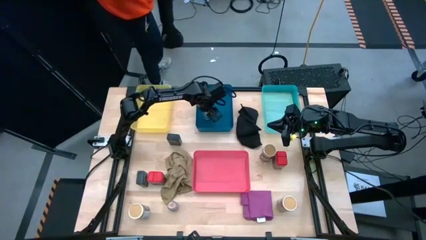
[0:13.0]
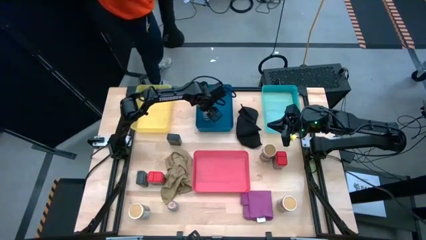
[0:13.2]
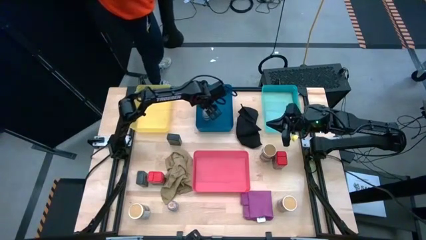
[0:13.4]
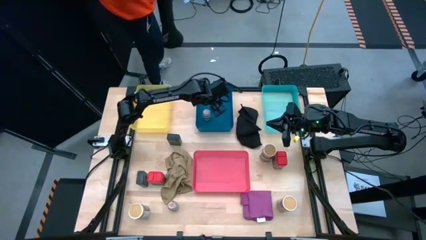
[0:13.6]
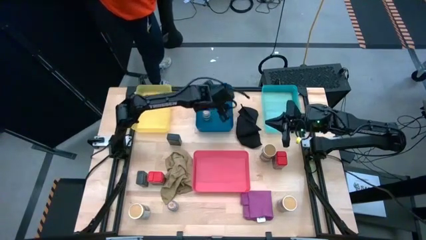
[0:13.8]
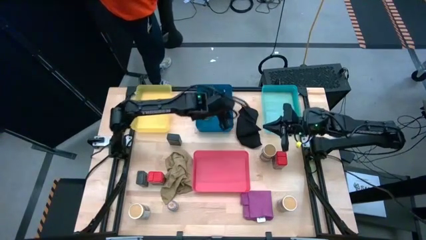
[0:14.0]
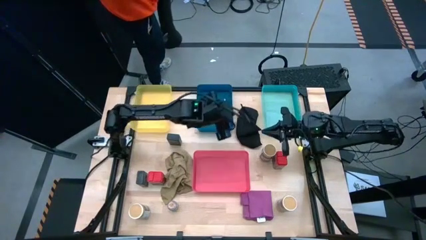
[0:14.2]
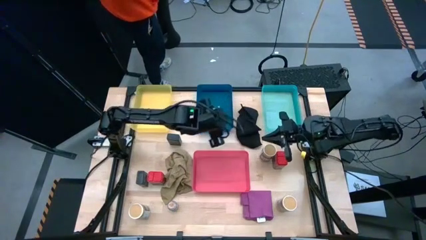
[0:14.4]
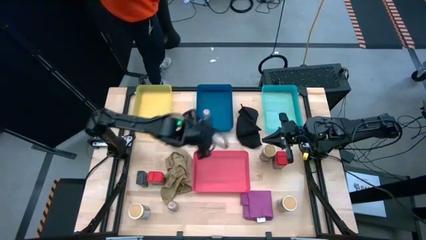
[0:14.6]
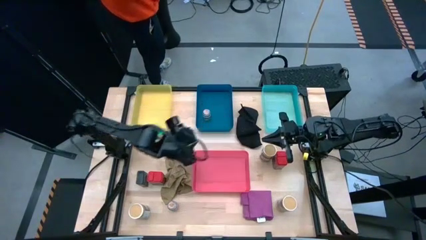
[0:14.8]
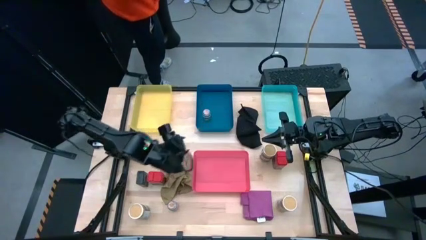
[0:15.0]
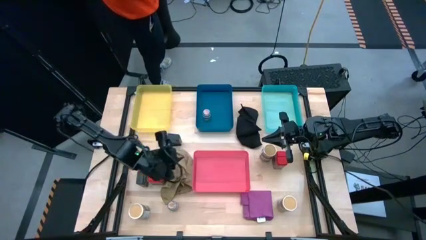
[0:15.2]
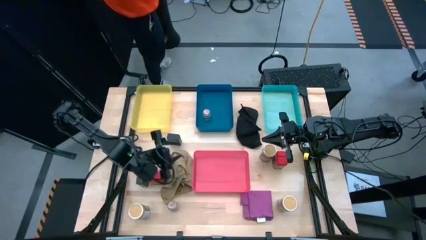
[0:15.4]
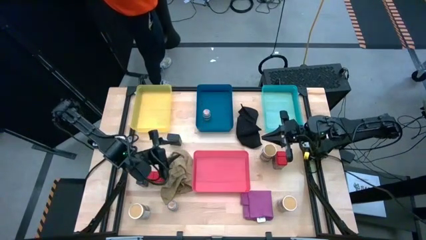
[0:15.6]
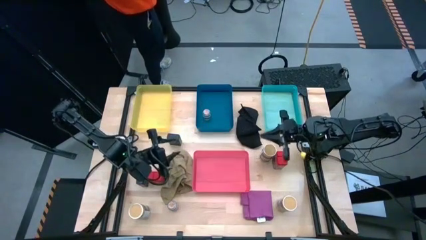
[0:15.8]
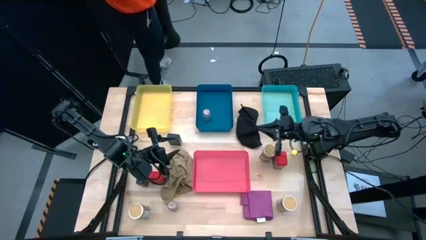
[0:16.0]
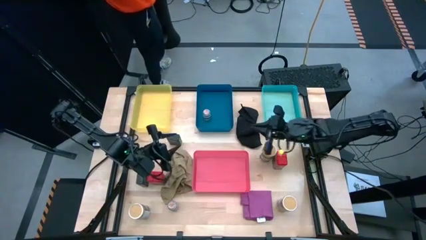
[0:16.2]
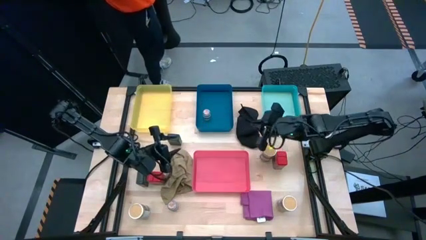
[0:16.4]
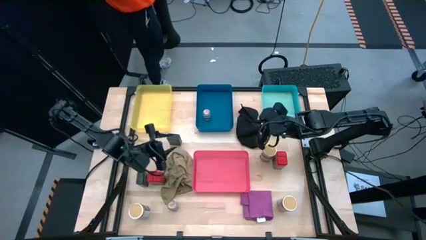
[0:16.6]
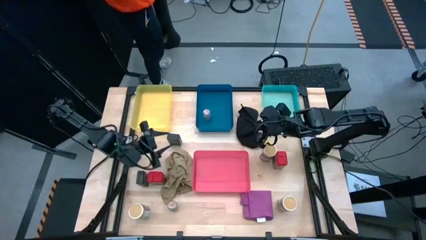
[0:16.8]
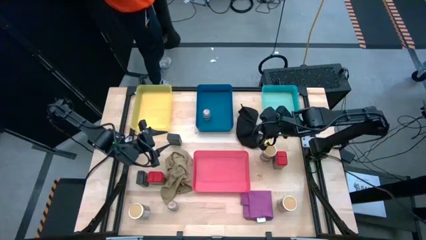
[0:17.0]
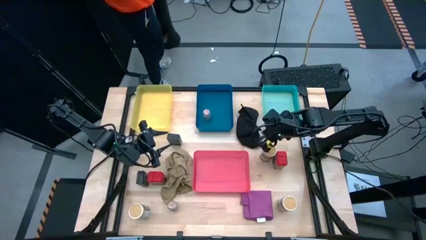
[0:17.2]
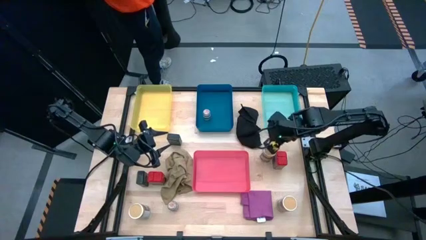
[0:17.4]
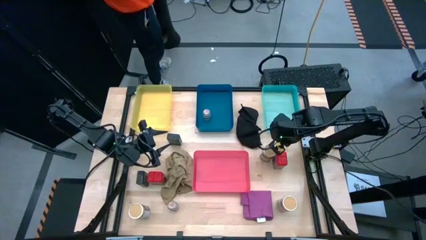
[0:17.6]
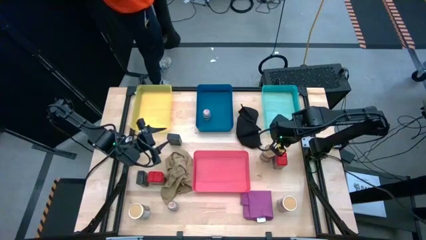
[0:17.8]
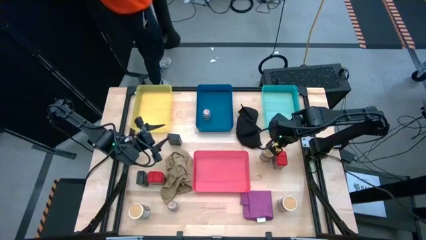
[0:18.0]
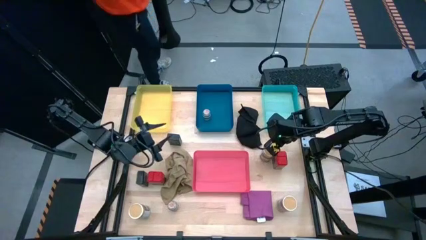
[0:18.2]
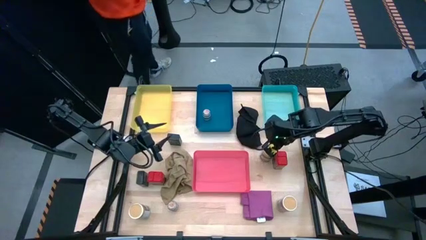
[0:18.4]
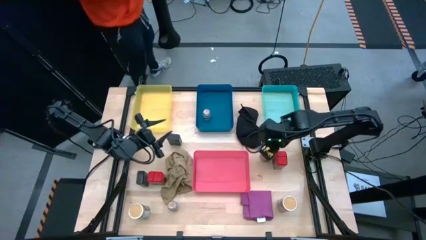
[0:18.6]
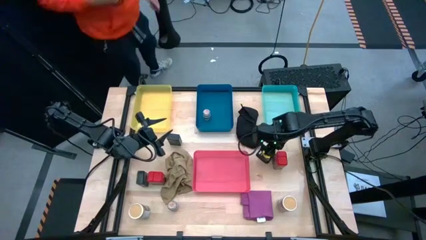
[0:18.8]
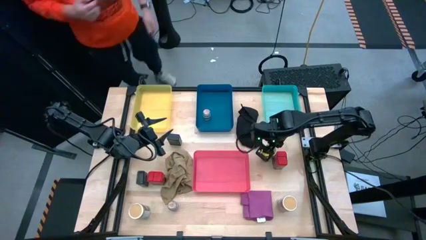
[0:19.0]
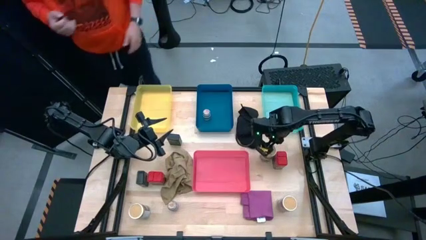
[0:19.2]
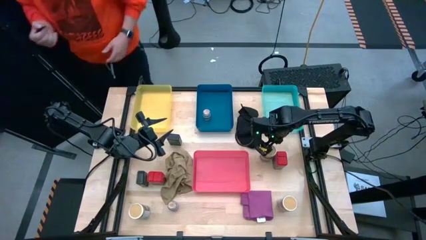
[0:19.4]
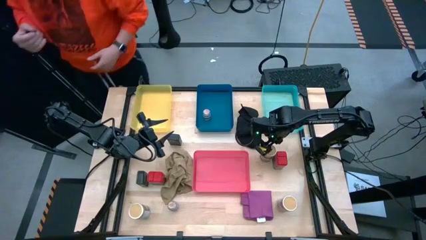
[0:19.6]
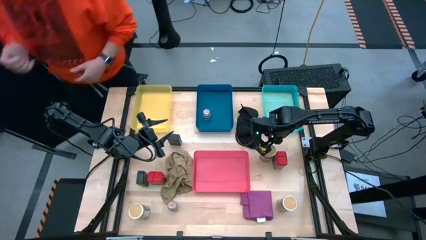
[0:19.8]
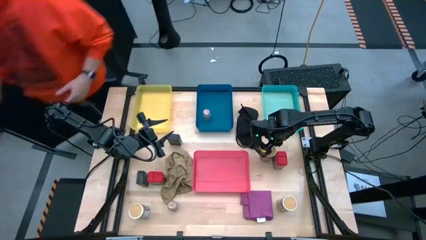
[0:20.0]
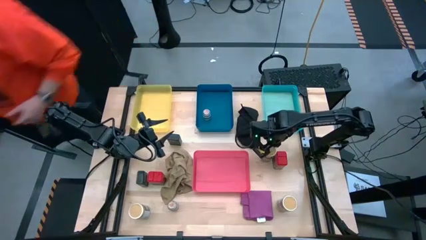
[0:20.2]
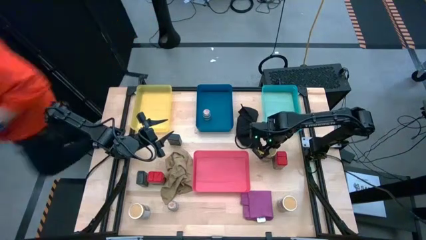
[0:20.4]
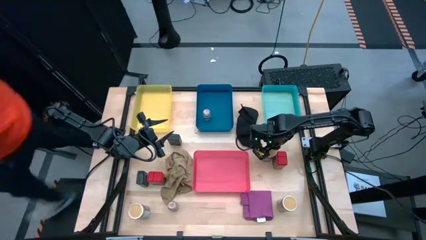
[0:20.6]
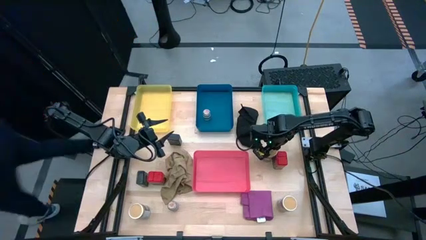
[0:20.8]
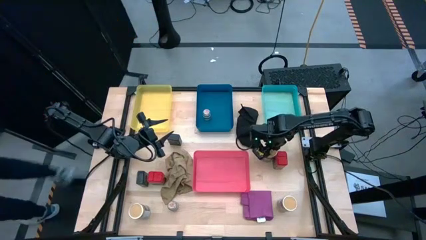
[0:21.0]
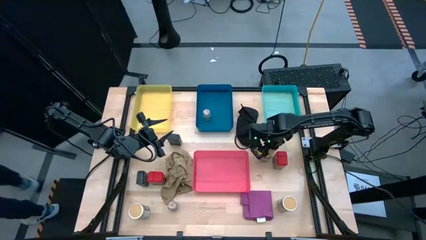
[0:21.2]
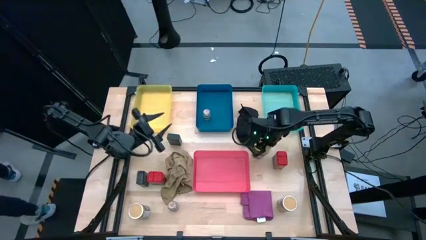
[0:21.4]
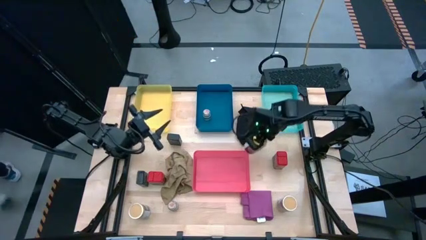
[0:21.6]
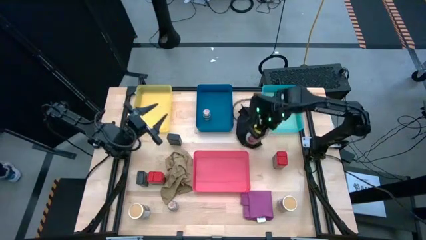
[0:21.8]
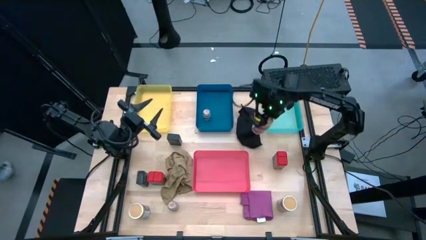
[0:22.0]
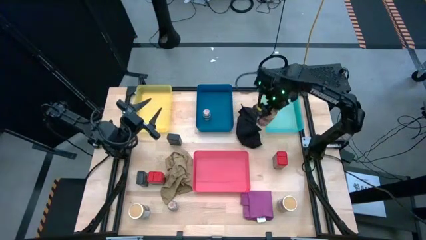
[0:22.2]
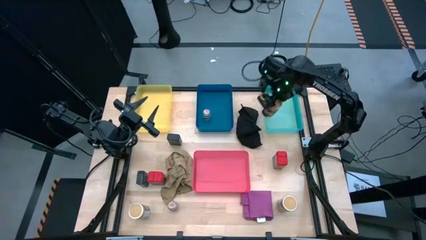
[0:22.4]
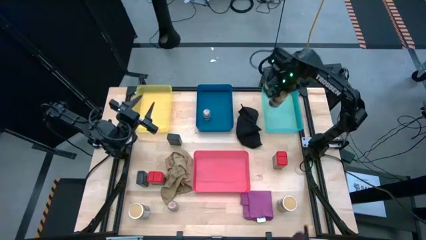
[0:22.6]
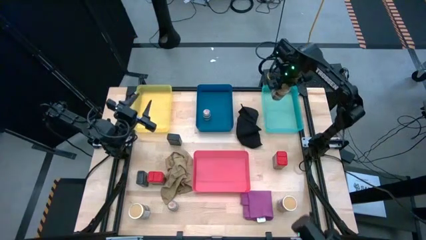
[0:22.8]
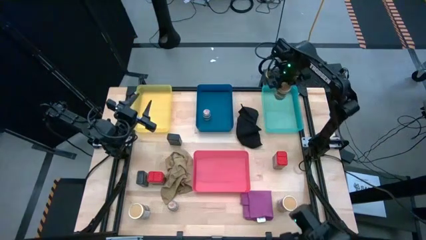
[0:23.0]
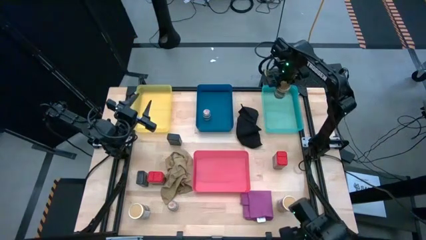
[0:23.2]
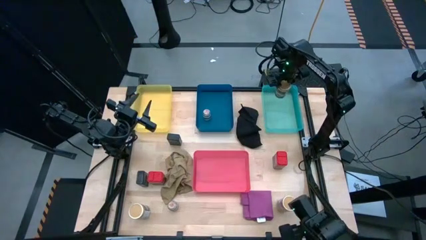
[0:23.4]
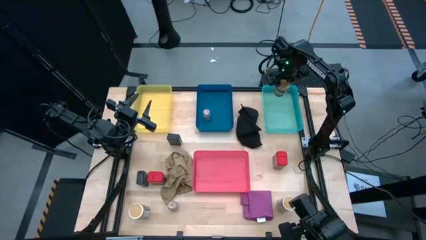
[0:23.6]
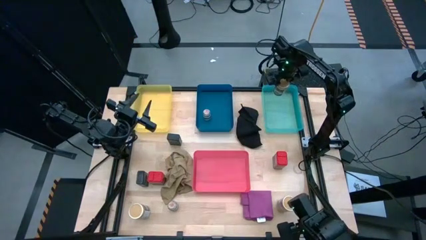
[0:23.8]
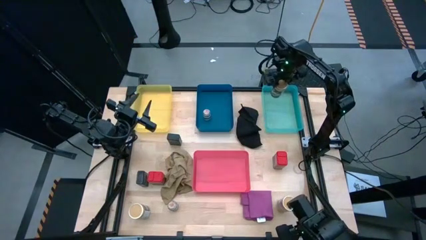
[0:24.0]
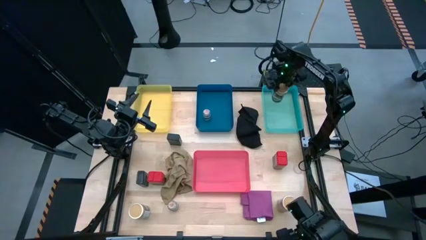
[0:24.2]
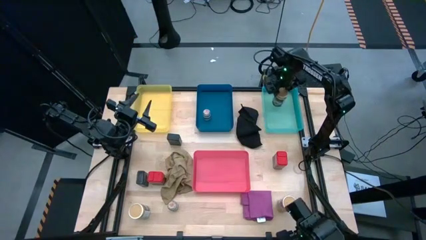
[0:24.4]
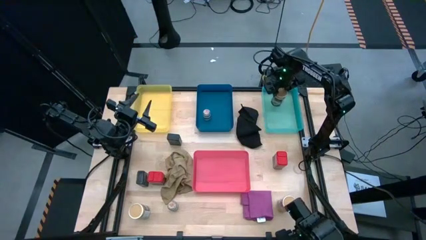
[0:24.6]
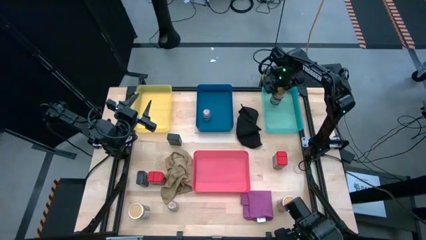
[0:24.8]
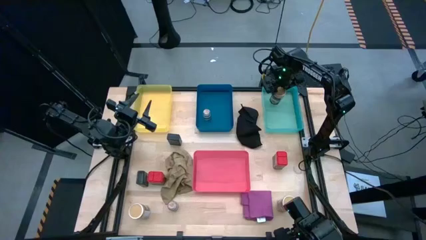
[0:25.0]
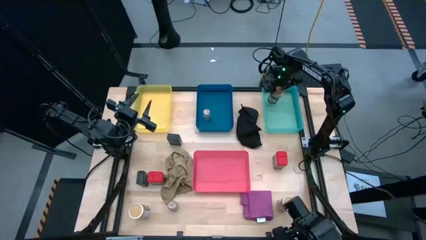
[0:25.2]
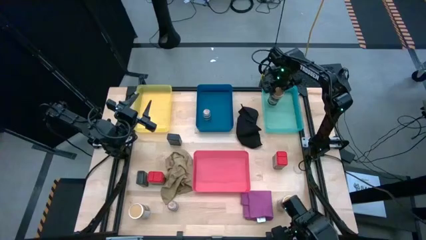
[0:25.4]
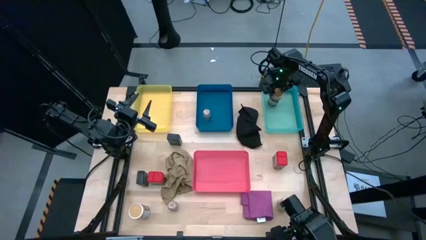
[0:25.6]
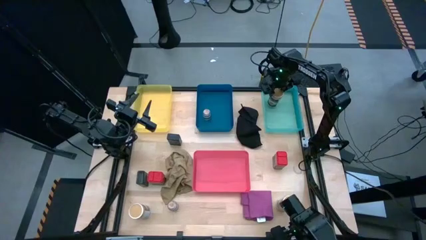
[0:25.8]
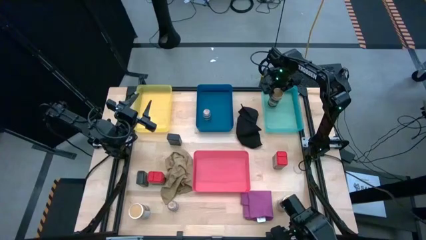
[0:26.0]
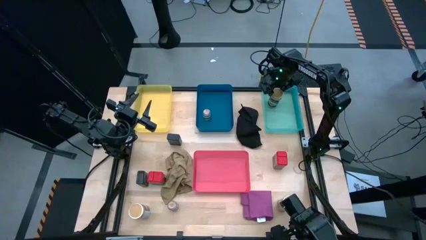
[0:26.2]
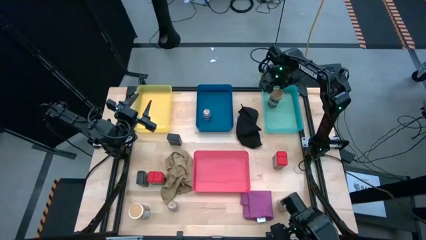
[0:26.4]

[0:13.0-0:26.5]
Task: Sort spices by type
Put the middle right golden seasoning bottle into the light blue bin

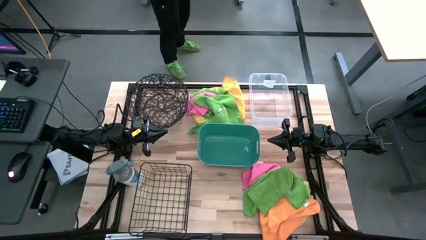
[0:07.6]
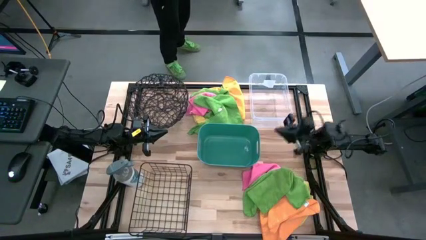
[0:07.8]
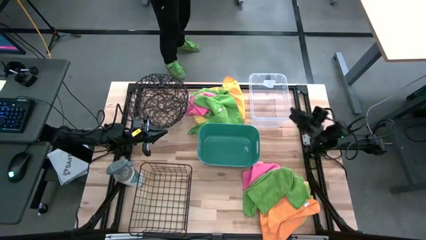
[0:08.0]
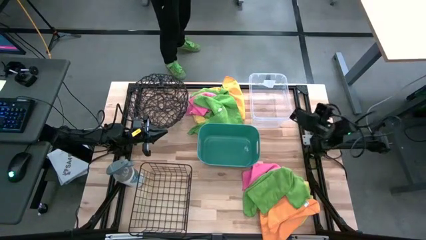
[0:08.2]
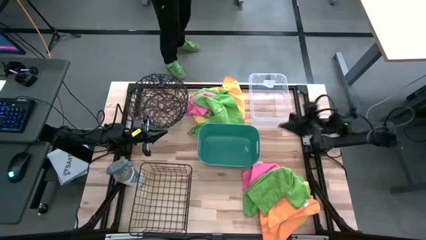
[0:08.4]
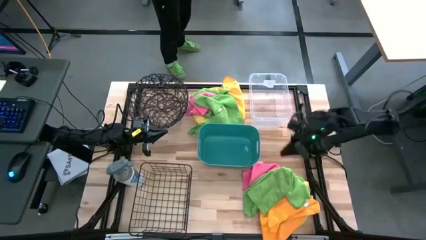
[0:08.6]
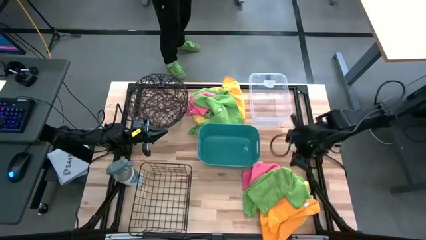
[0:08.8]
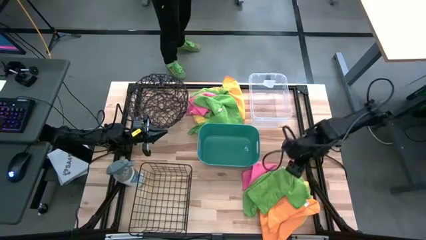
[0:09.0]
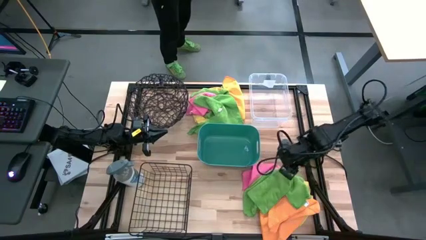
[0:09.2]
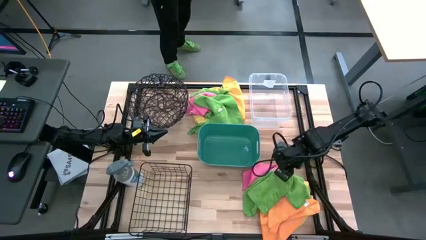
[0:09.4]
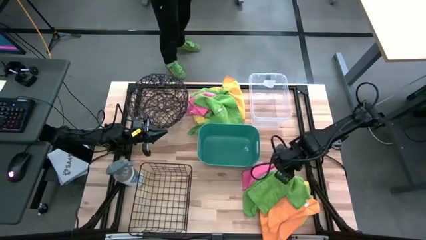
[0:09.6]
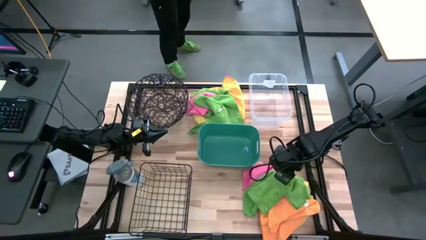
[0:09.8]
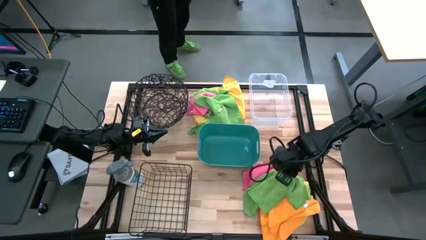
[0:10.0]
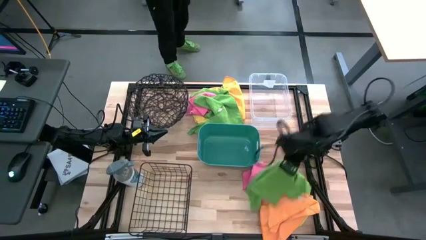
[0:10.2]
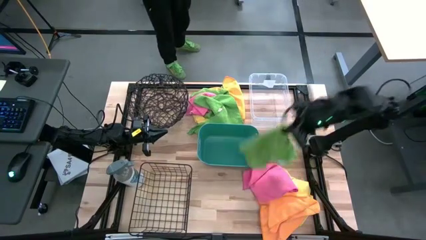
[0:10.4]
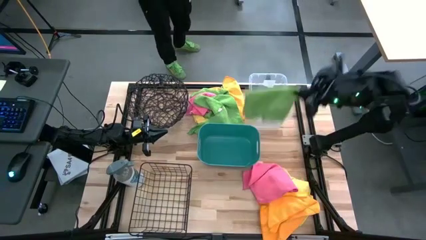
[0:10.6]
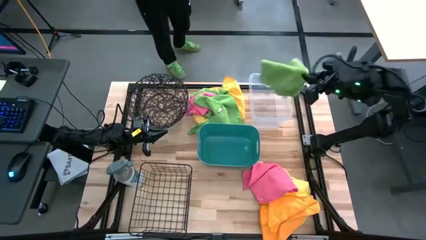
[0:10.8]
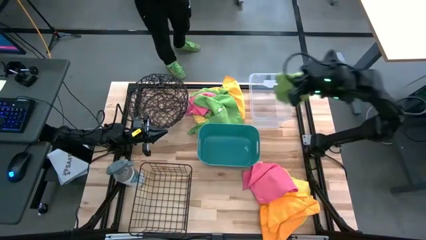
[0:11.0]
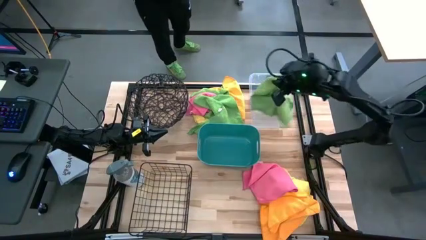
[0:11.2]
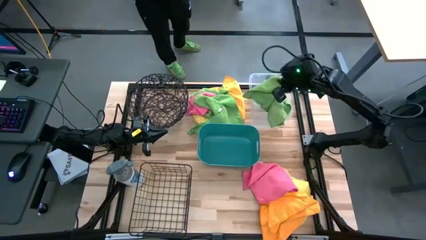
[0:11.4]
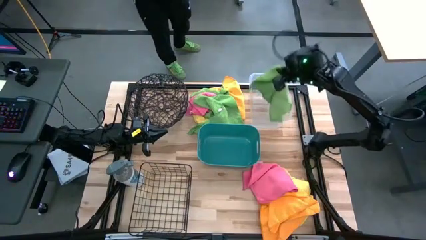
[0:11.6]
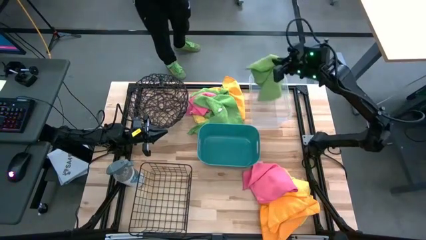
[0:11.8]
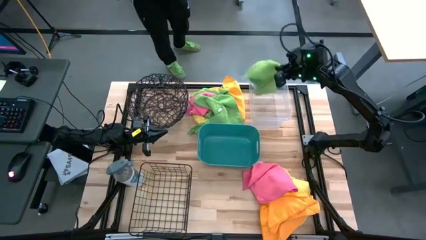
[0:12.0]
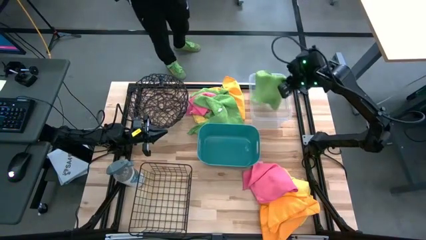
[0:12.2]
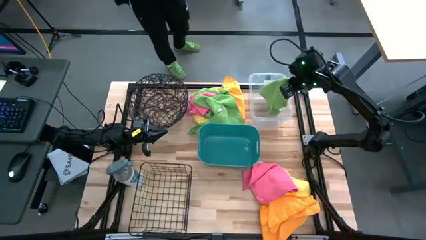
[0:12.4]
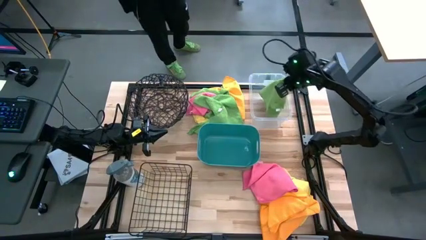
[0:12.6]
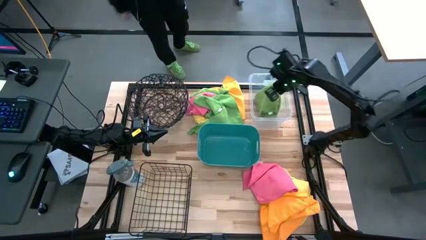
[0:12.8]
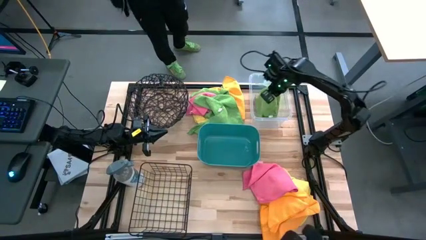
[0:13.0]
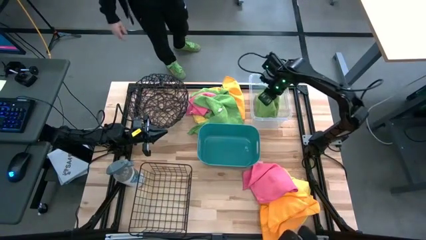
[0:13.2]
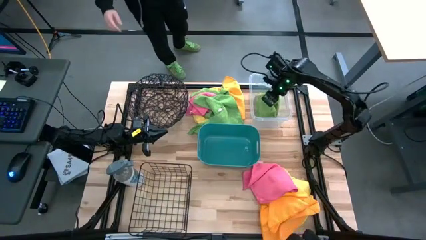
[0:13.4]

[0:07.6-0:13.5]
Task: Sort microfiber towel by color & place in baskets
Put the green microfiber cloth into the transparent bin
